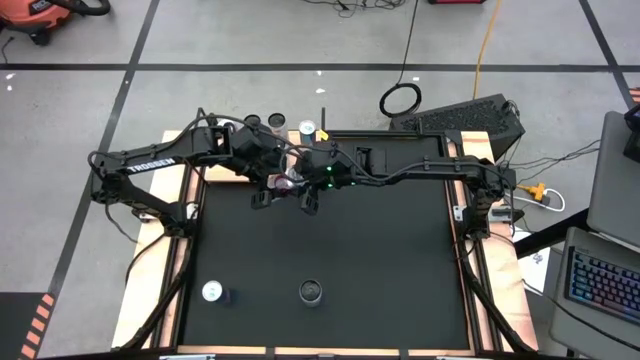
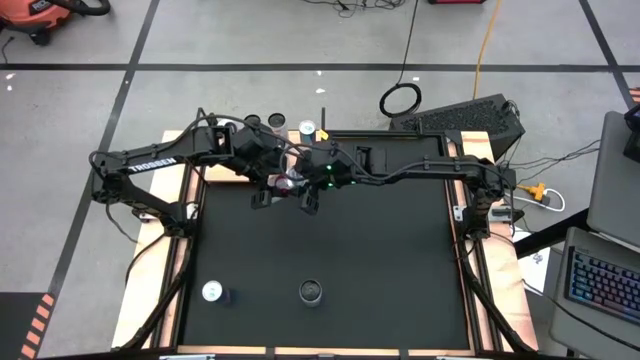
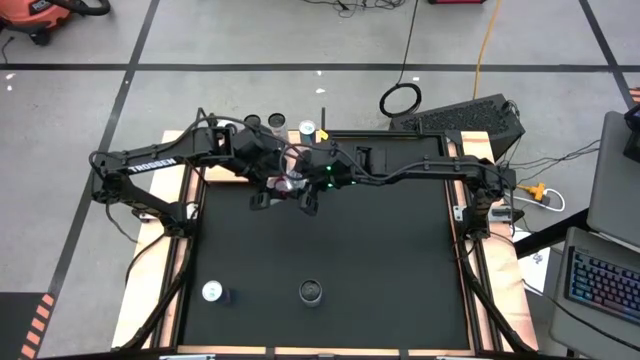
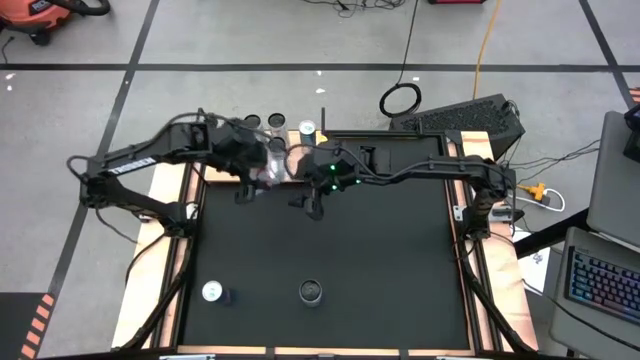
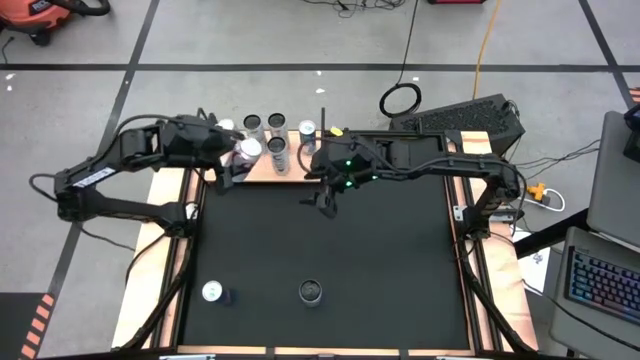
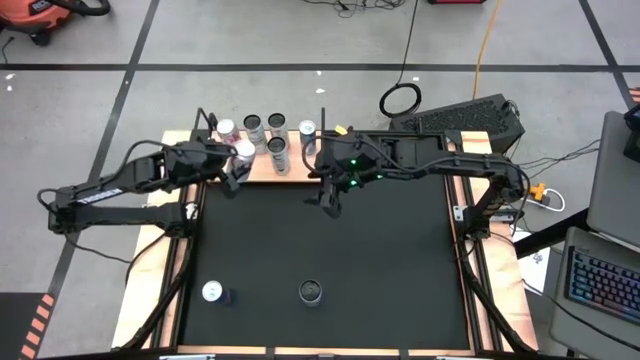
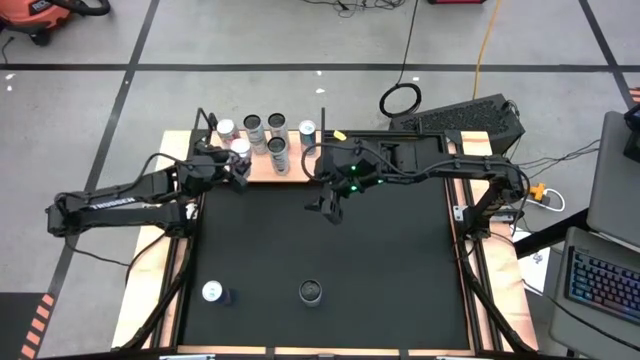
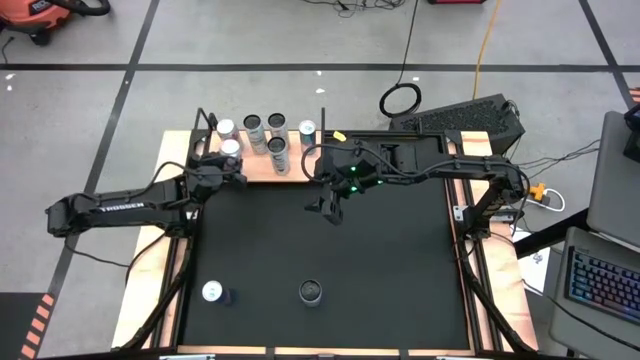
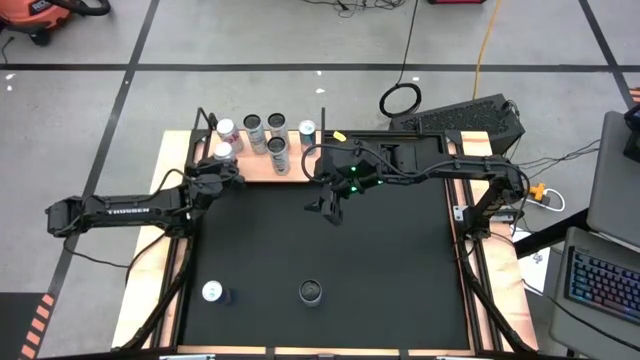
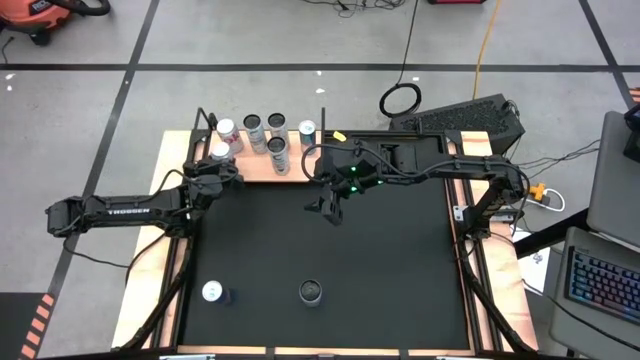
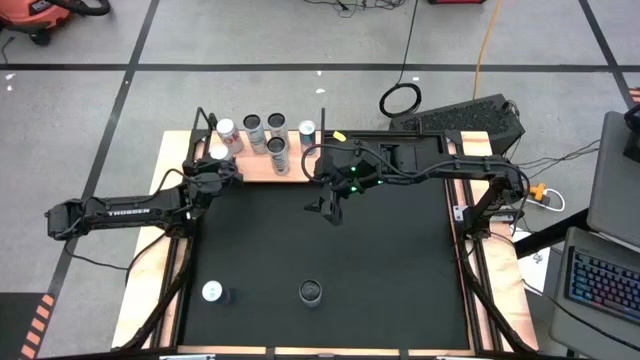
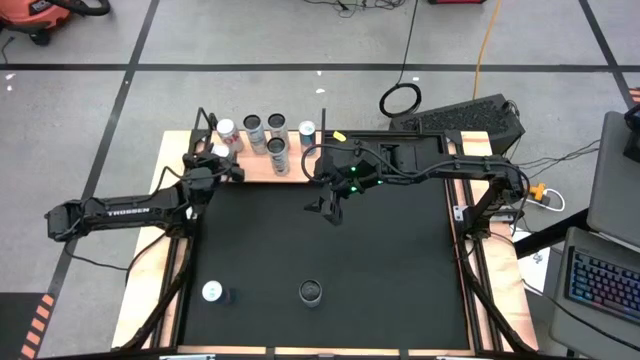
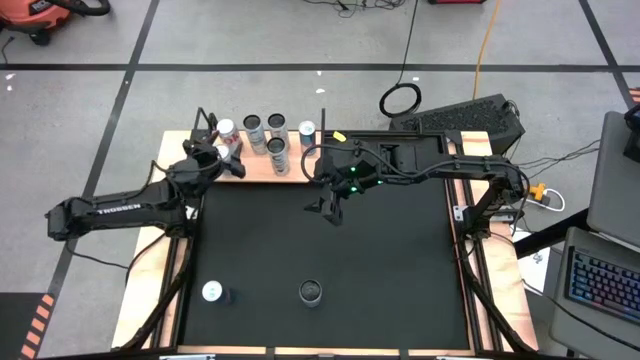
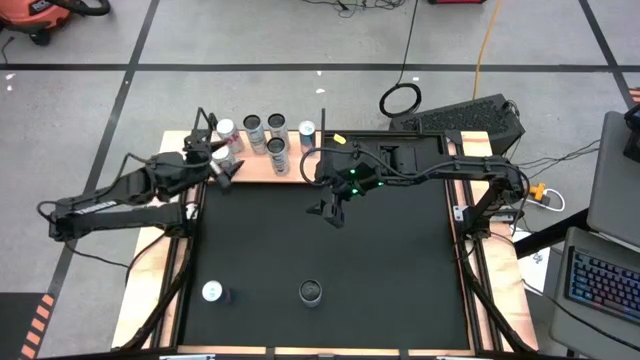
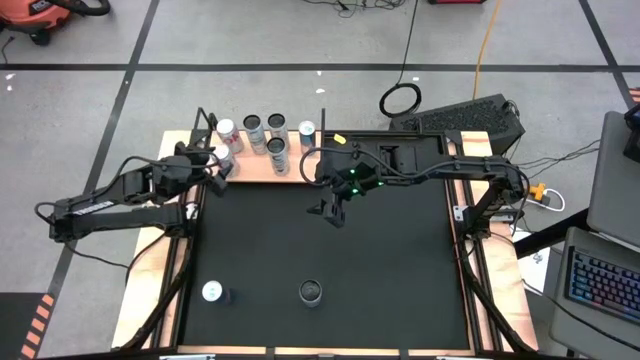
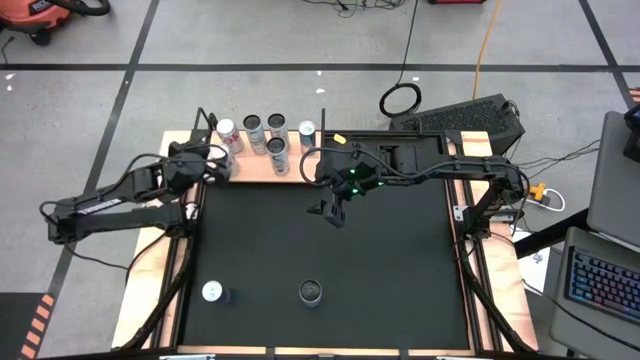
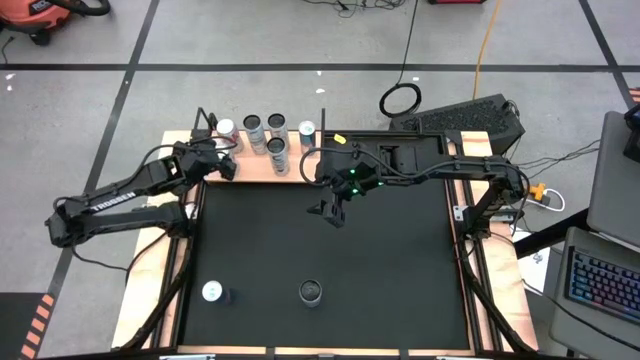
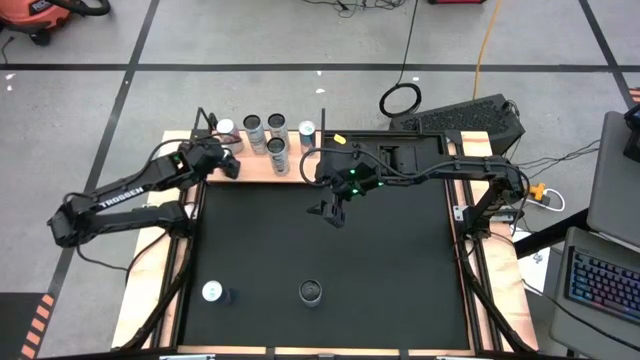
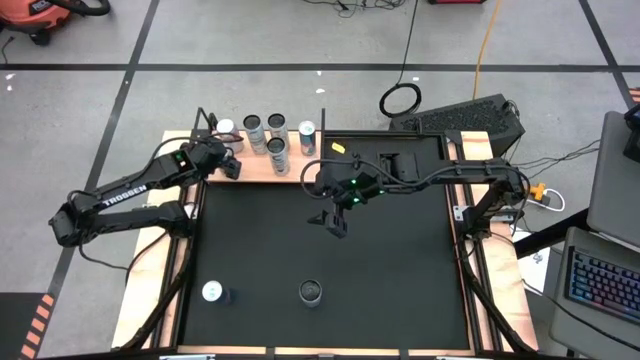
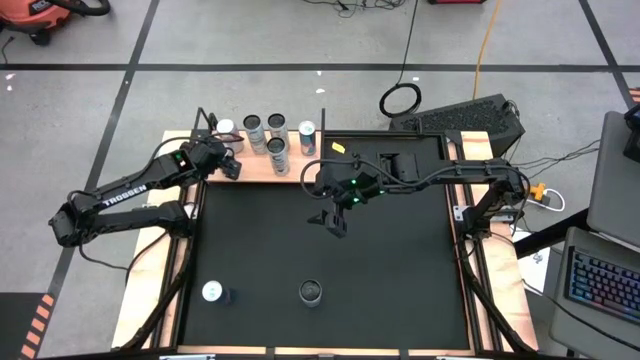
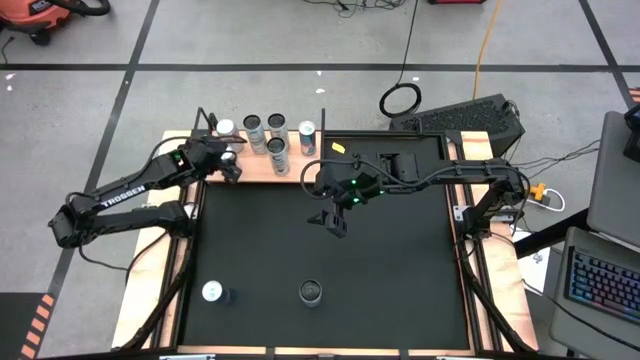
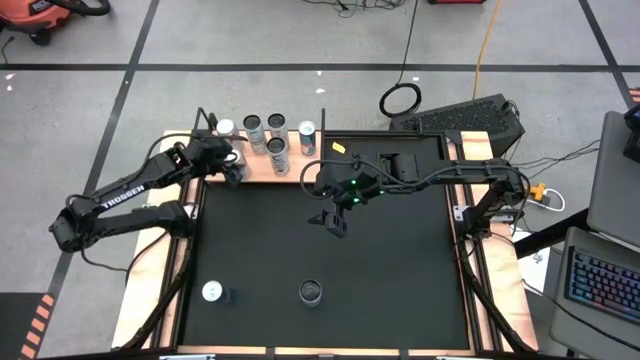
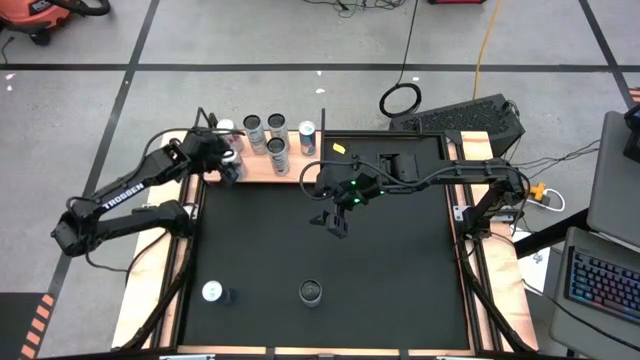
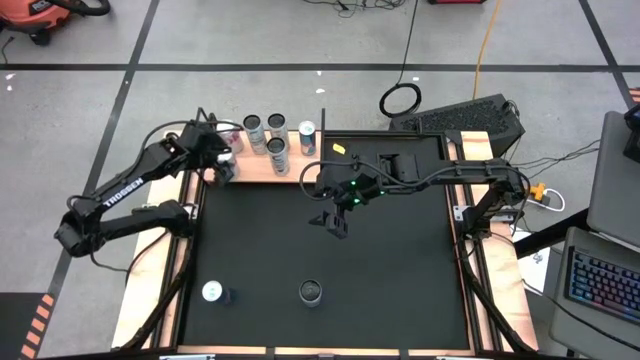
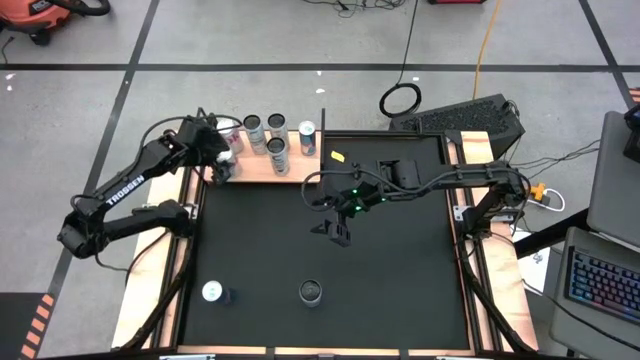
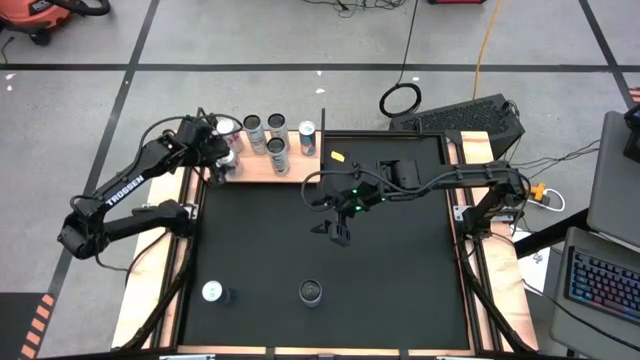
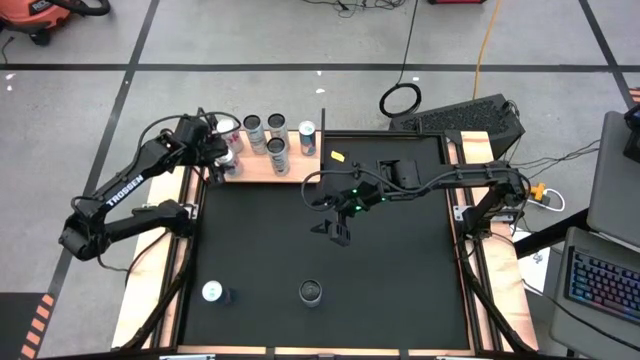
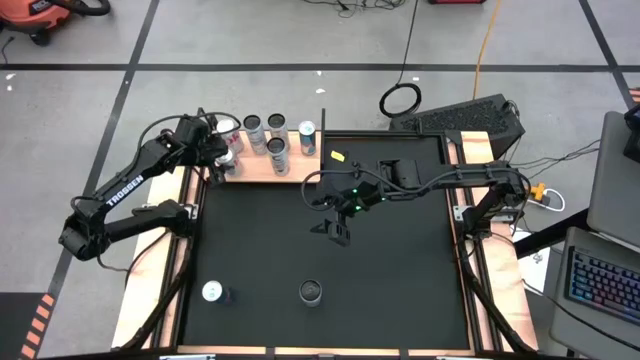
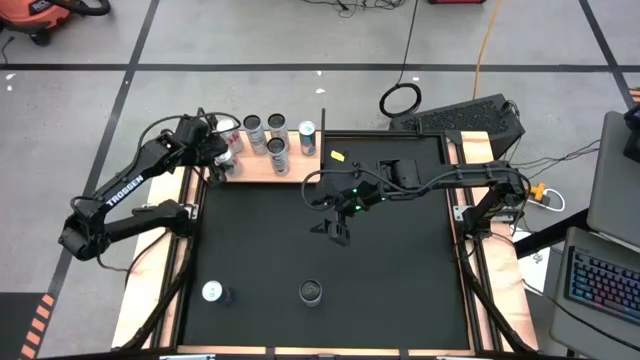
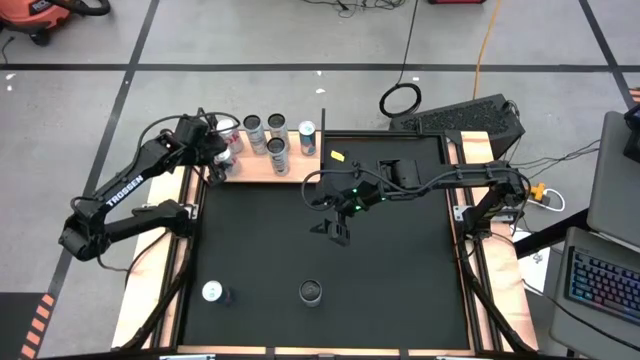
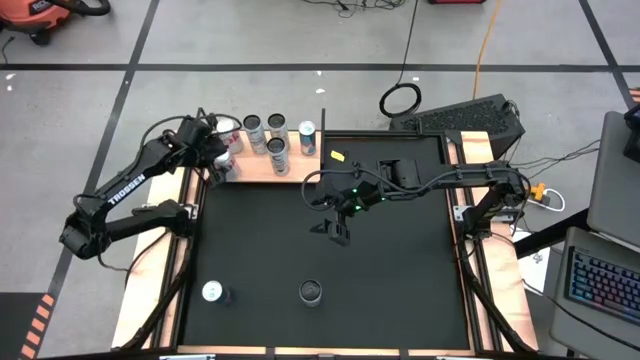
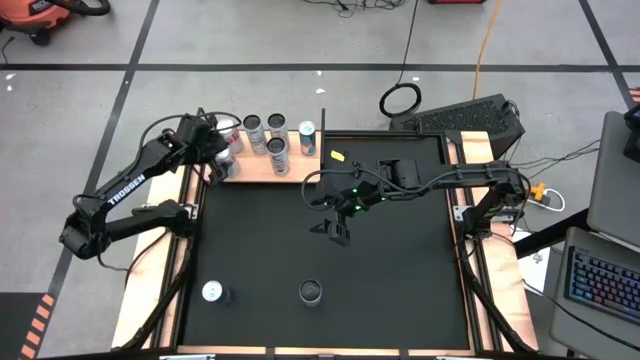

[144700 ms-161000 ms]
Task: Place canned beverage on shelf
Put the red silver soda can on the shelf aligned with the red silver soda can

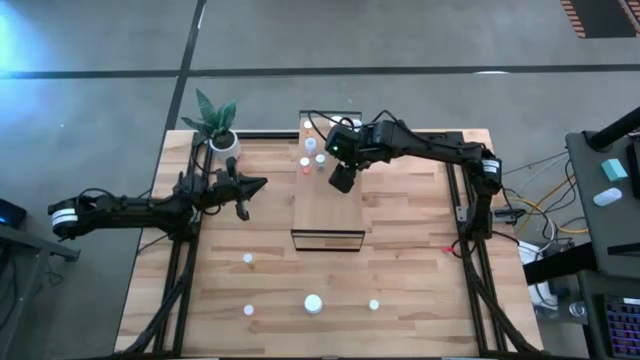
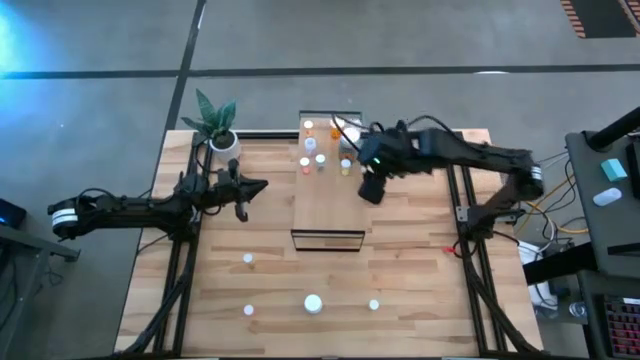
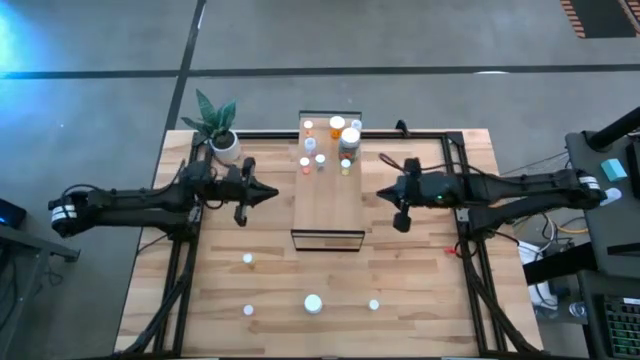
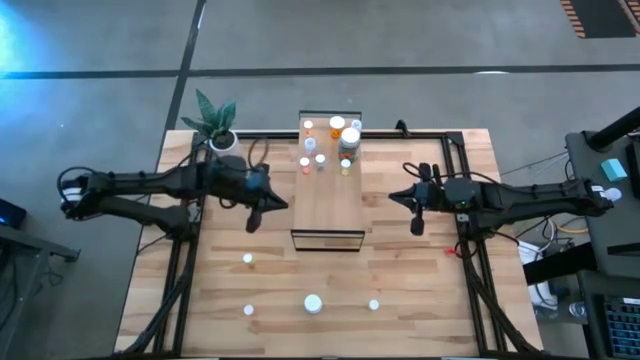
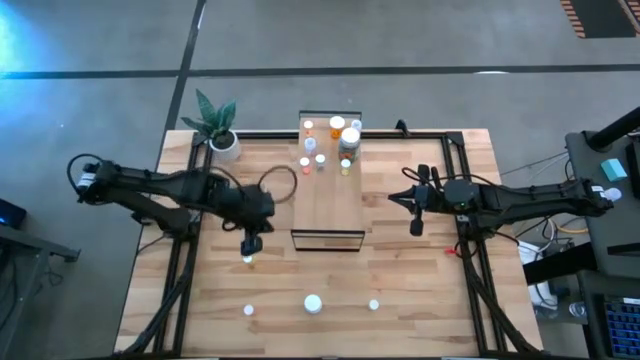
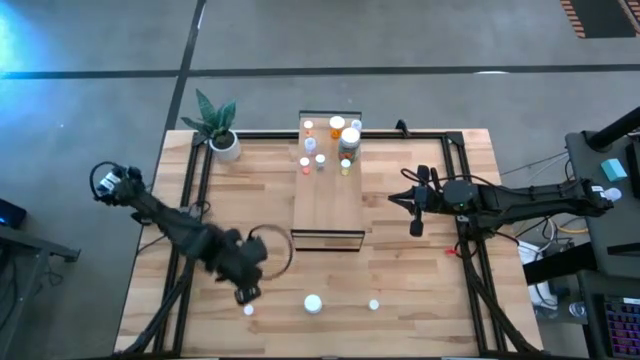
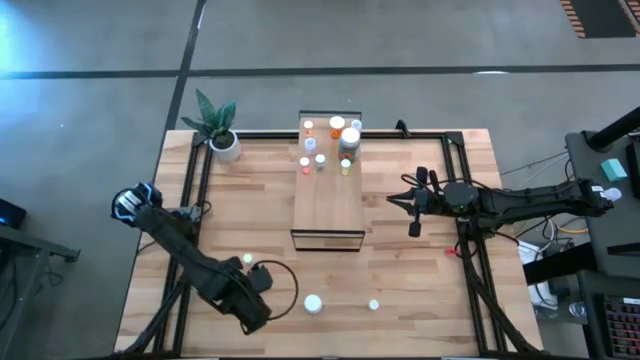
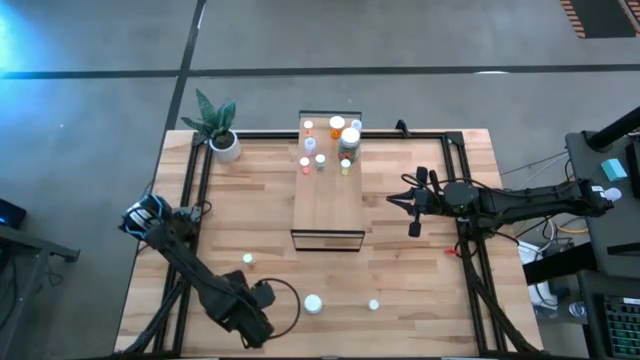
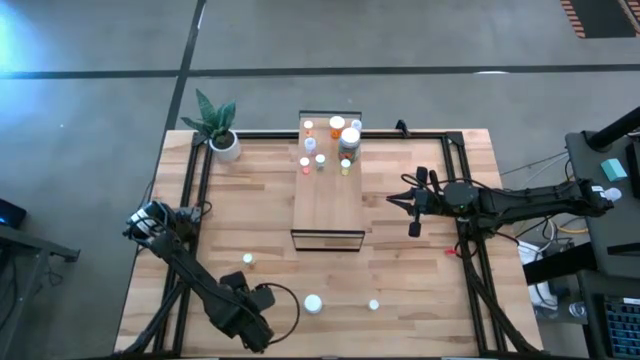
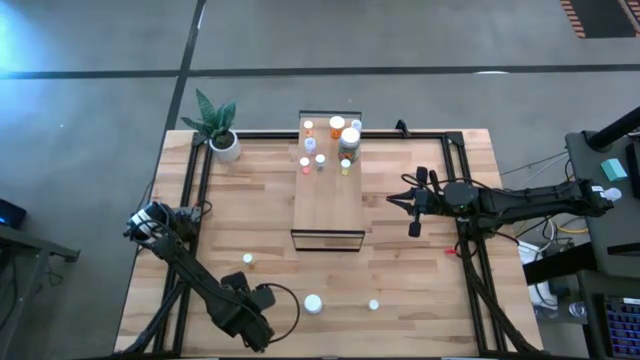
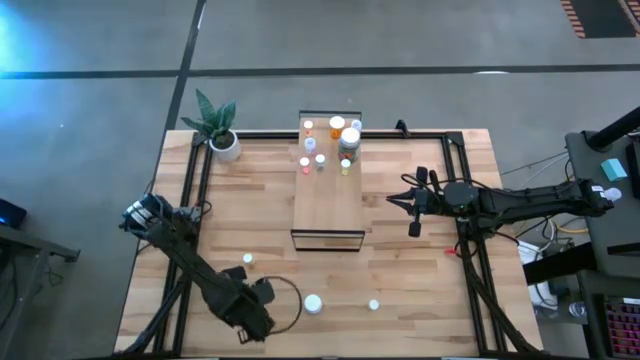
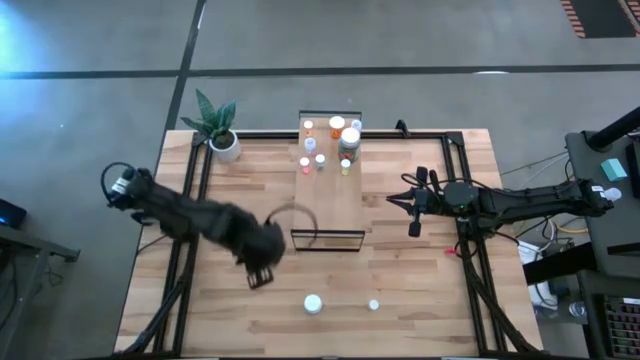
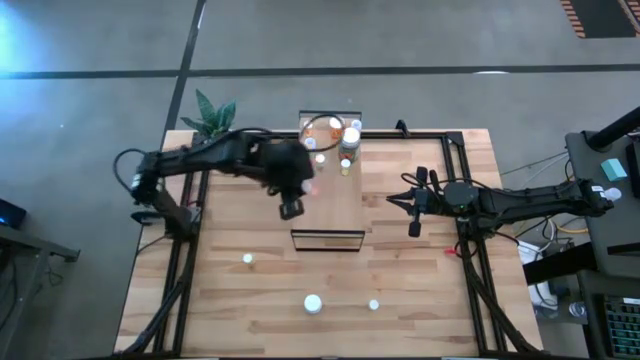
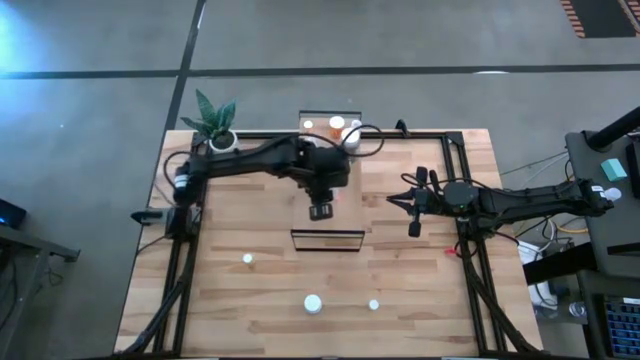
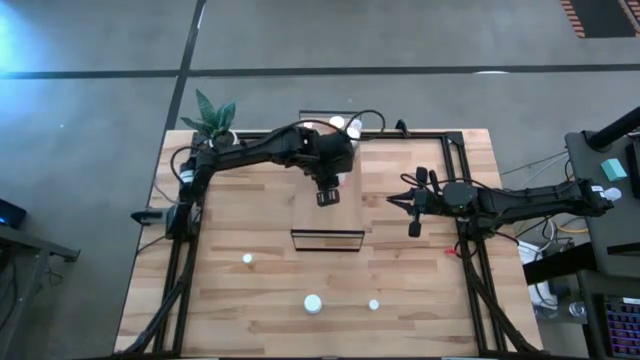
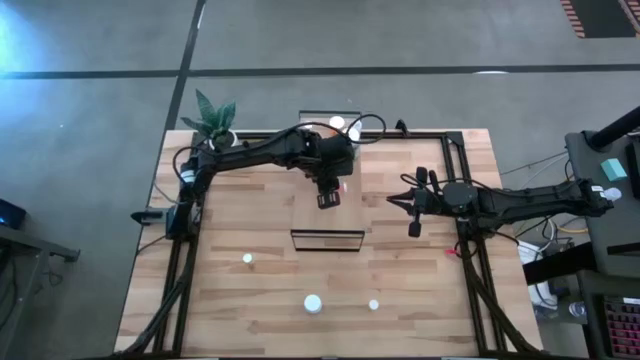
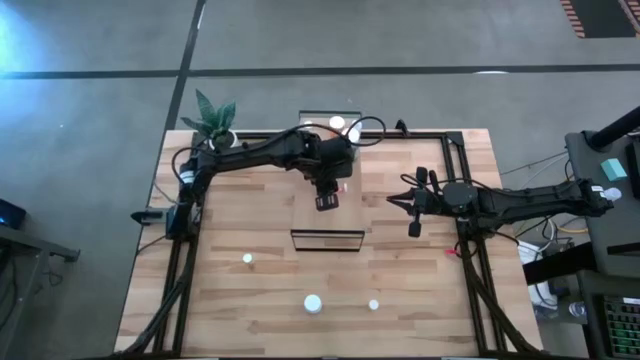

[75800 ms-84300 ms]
Task: Pick and place medicine bottles onto shelf by color
Put the red pill bottle on the shelf
